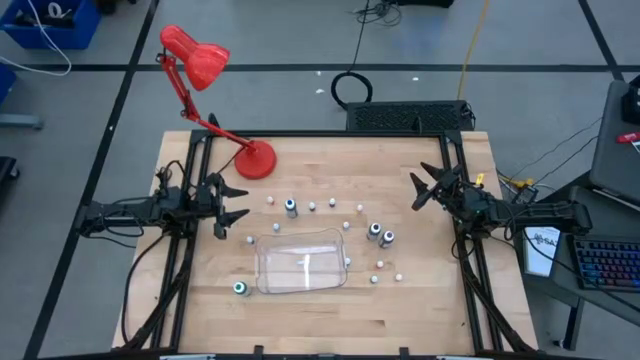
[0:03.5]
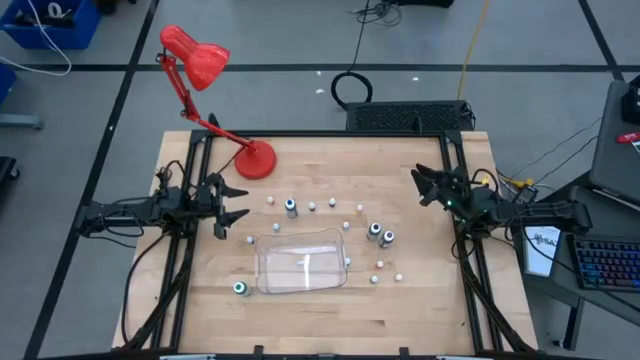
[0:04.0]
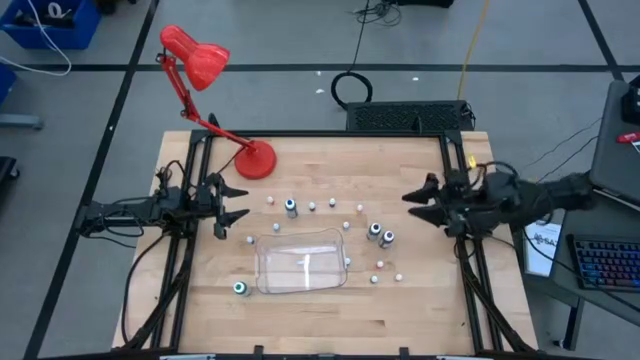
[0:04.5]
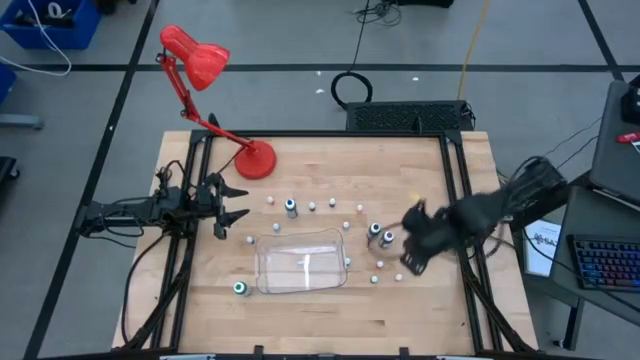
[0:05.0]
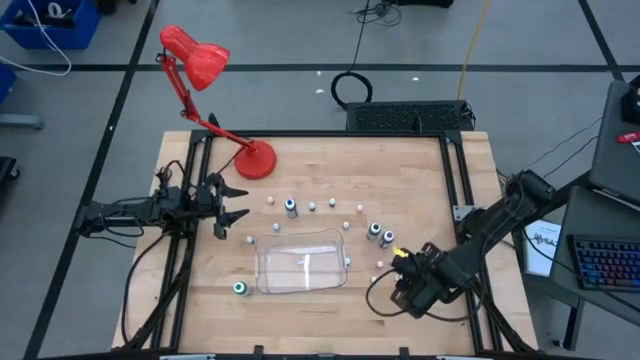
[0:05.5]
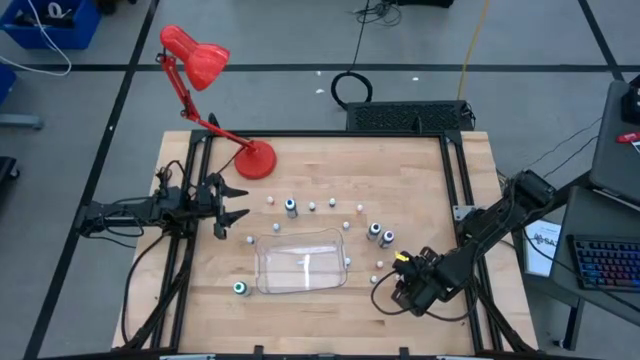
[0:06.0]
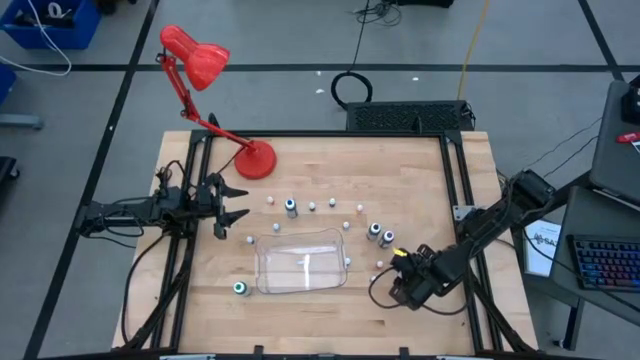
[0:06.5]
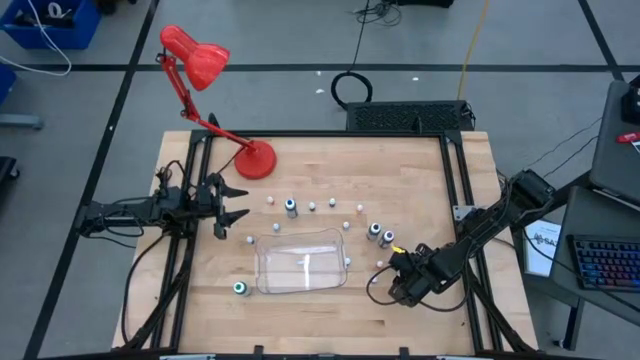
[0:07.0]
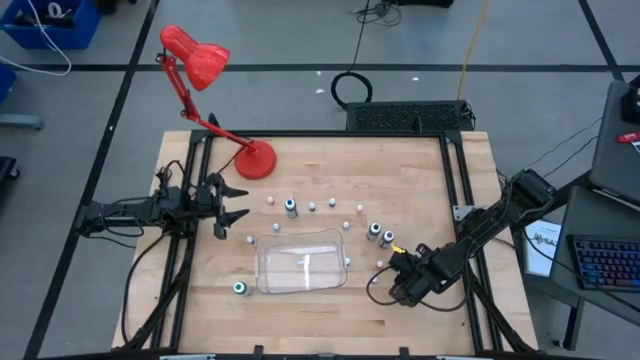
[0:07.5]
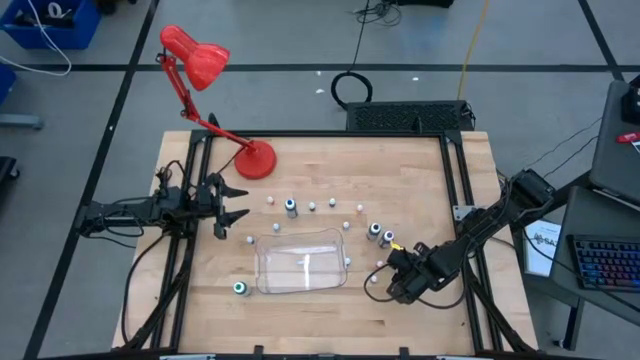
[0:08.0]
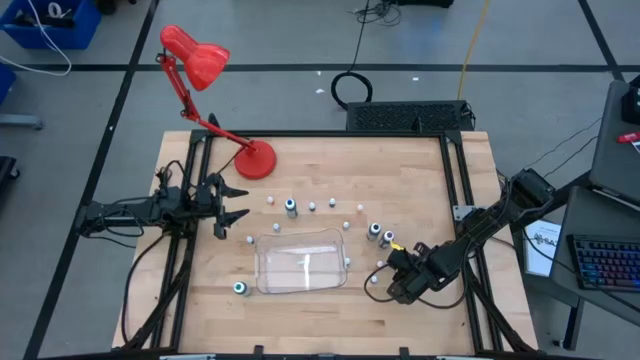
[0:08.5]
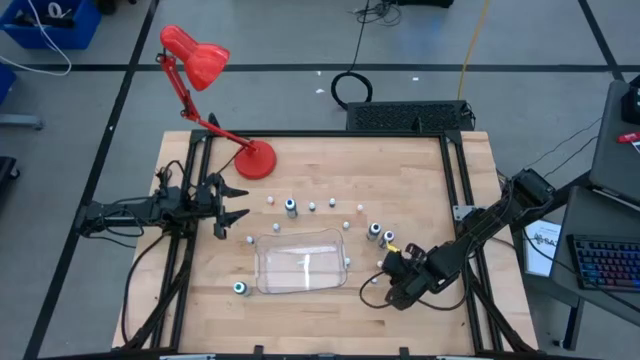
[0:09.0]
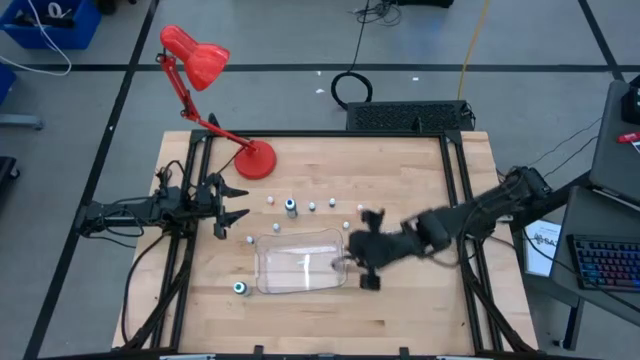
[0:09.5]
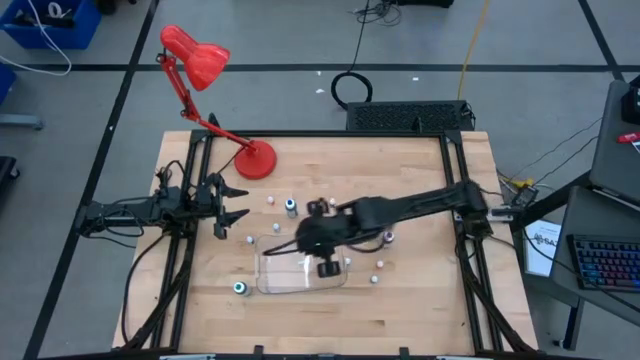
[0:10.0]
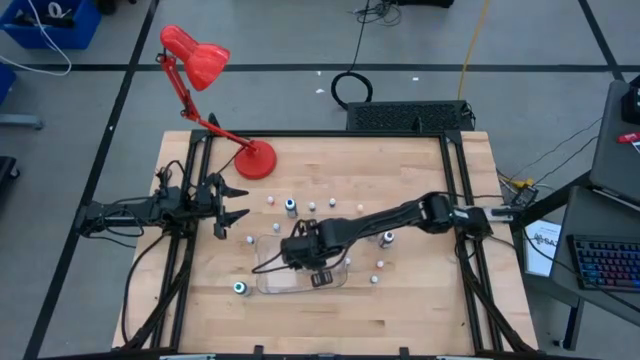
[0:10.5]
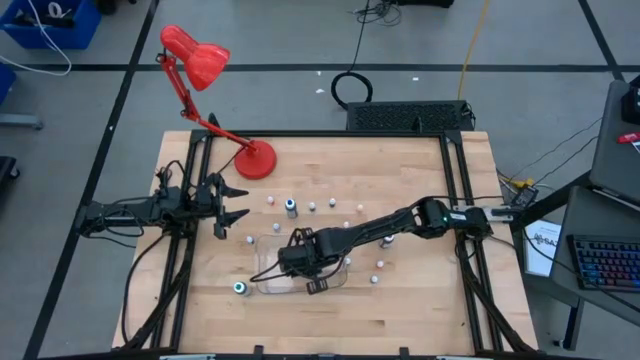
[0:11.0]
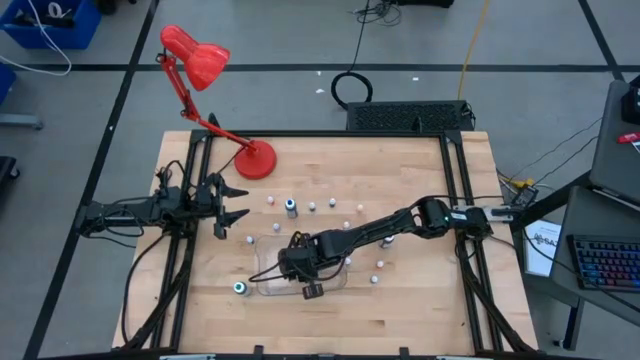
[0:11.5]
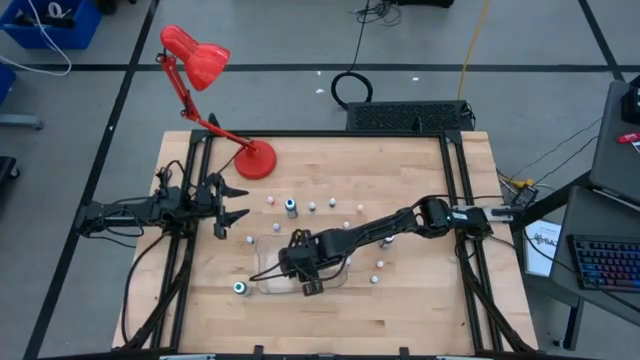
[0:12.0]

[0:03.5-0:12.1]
Task: Pick & Place food coloring
Put the bottom small orange food coloring into the bin

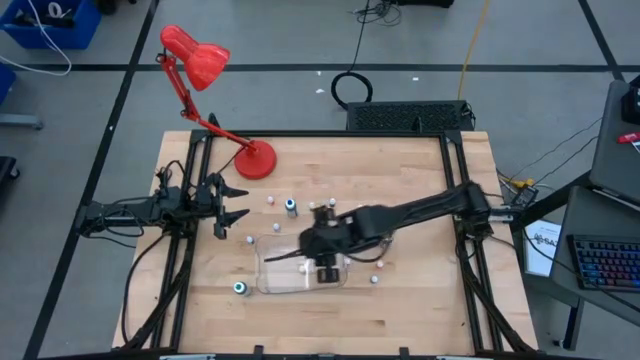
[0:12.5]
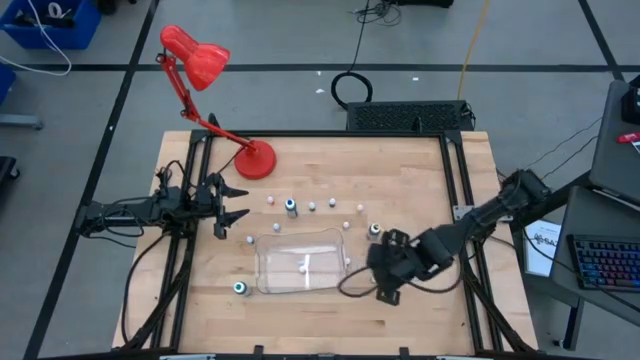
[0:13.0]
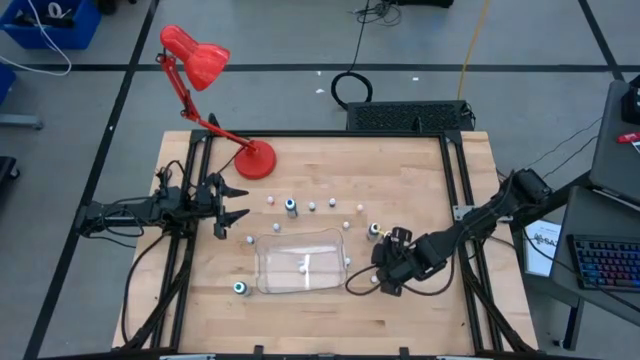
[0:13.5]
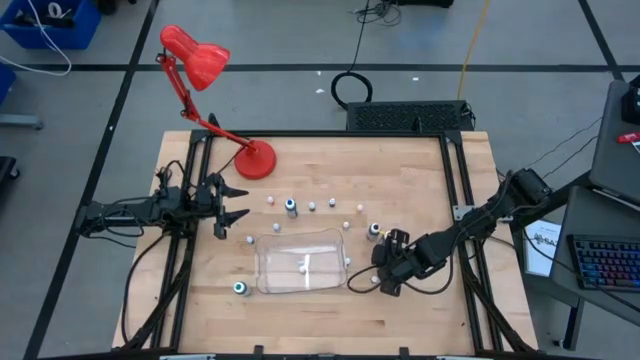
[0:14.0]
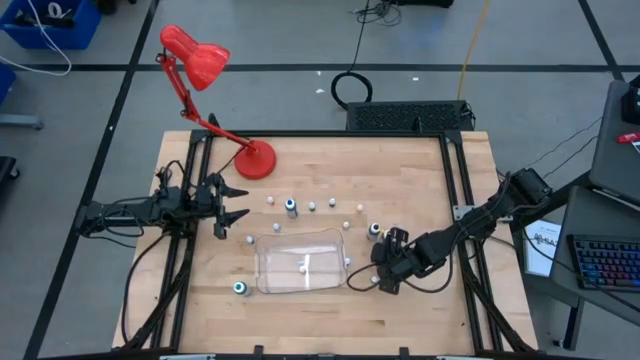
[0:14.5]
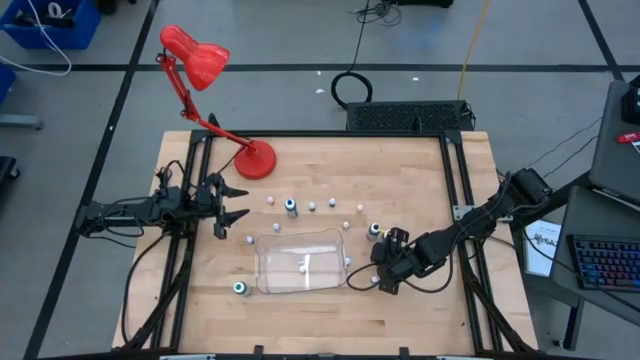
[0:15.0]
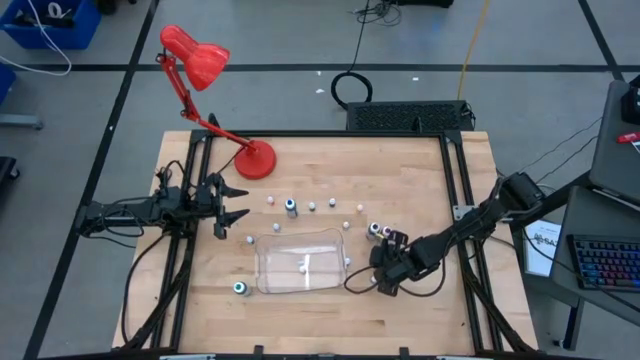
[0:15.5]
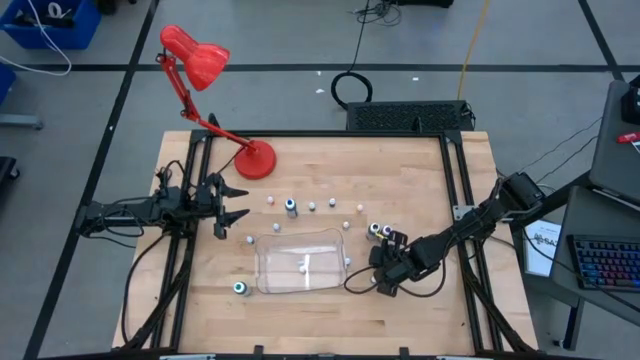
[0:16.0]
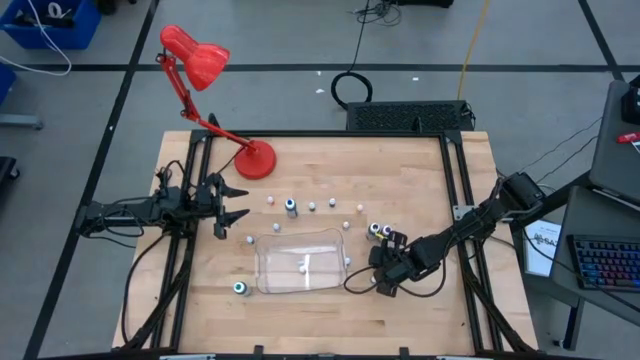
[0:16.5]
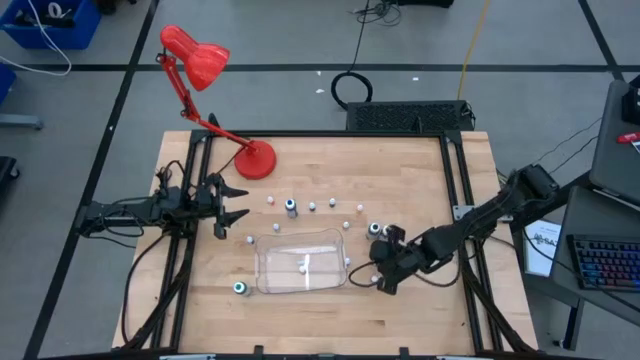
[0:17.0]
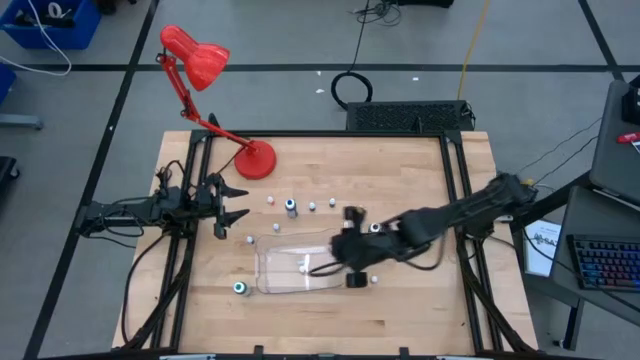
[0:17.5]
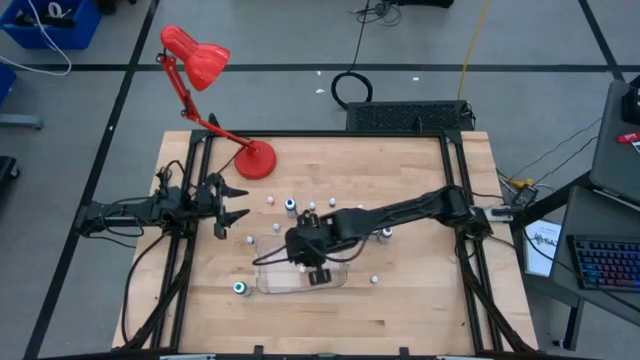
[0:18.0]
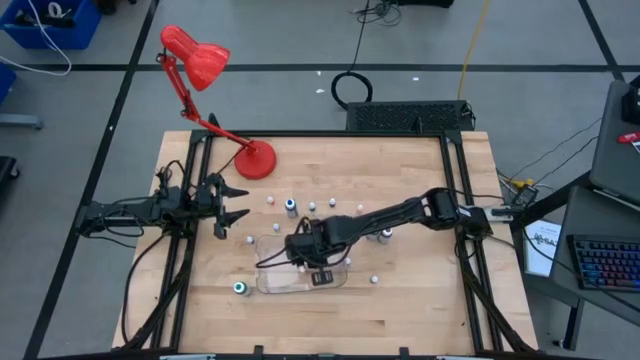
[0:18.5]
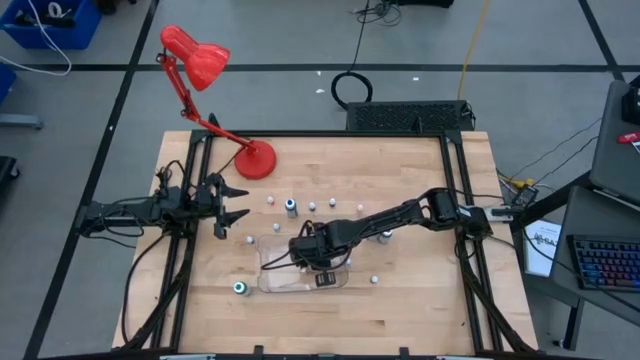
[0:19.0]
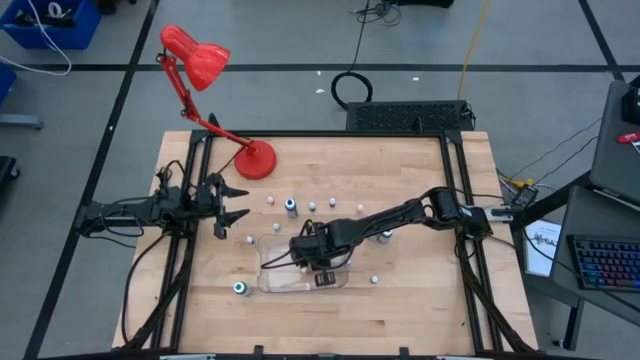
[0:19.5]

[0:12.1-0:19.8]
Put the bottom small orange food coloring into the bin

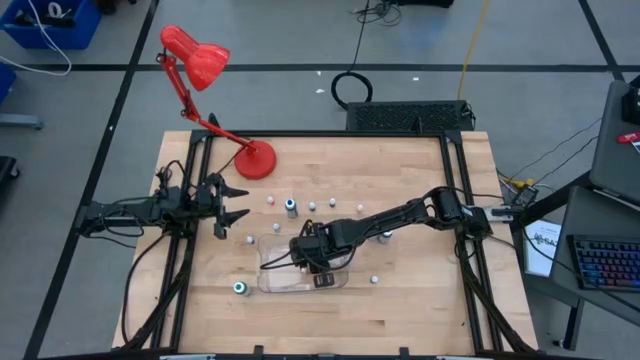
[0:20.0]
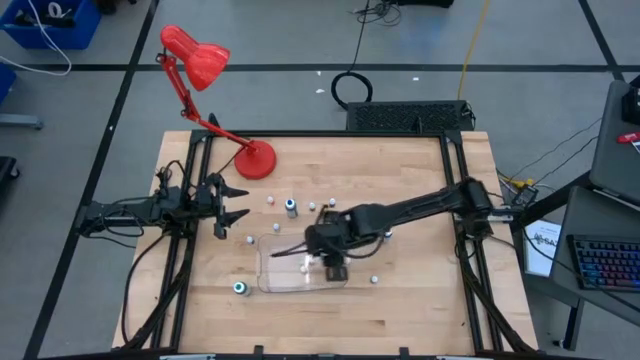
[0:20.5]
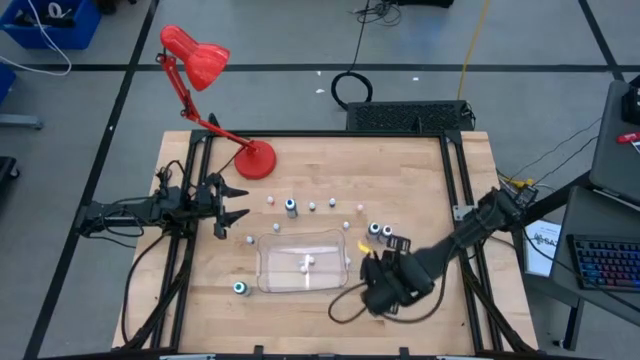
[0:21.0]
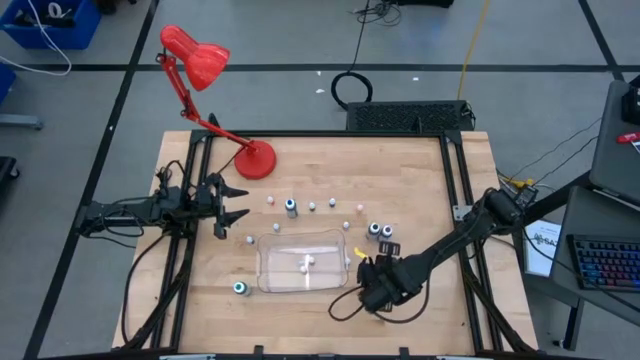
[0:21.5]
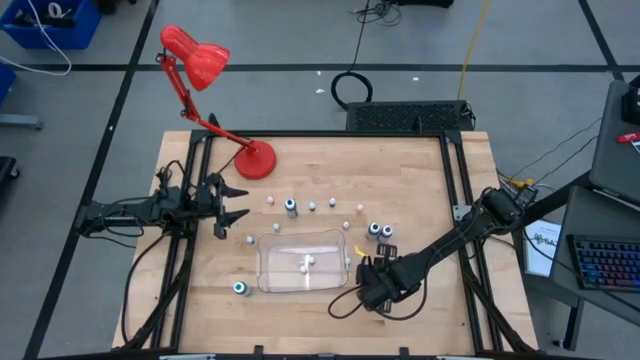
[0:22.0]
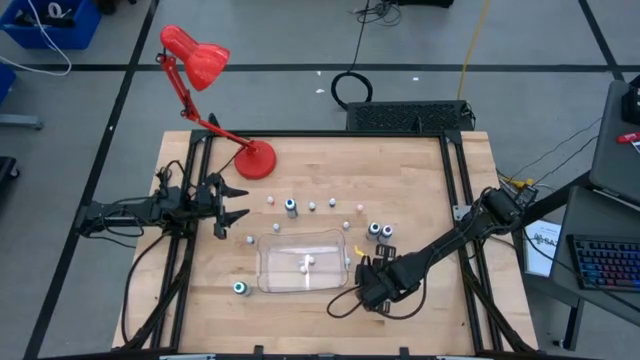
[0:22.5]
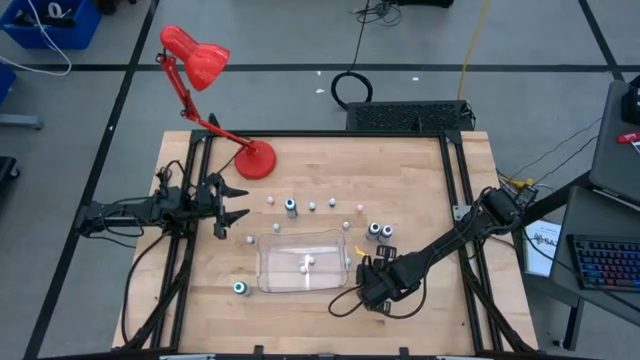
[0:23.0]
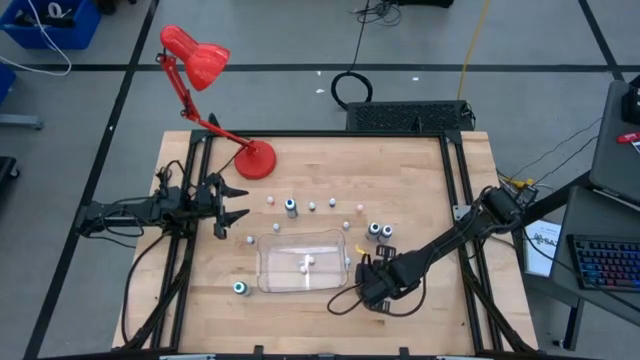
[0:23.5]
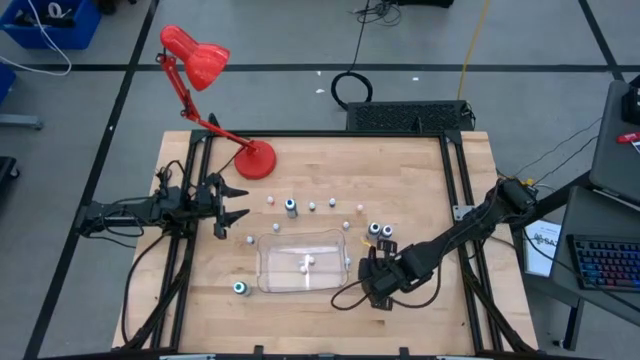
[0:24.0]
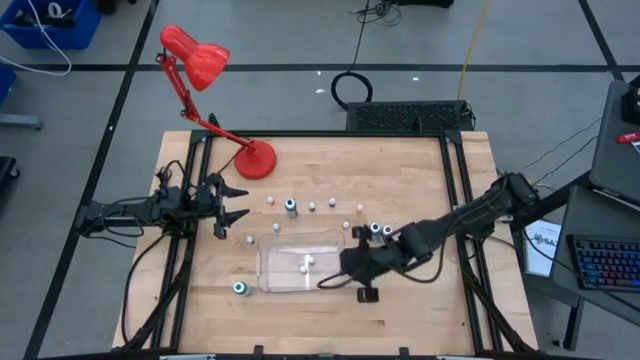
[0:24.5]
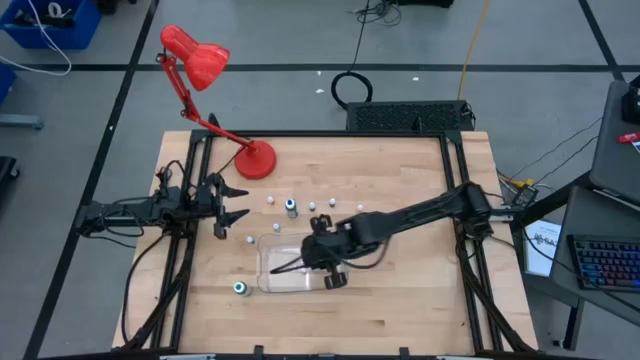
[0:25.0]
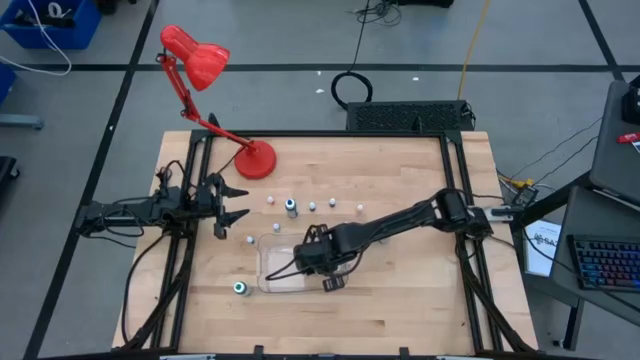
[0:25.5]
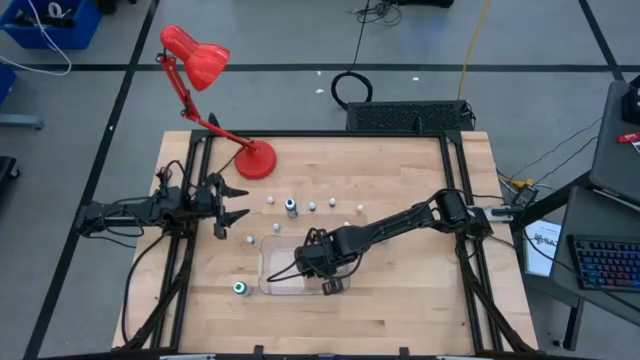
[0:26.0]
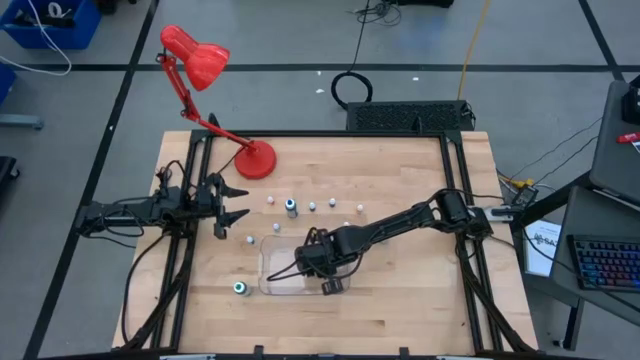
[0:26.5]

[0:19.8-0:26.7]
Put the small black food coloring into the bin
